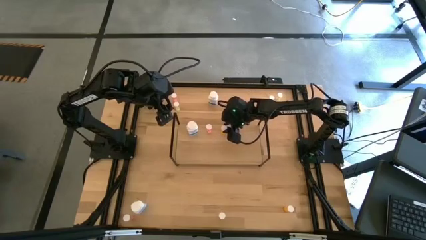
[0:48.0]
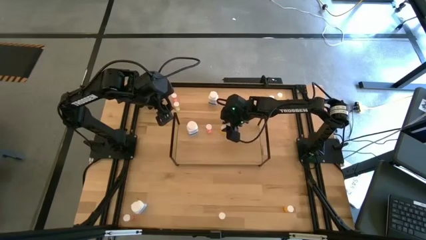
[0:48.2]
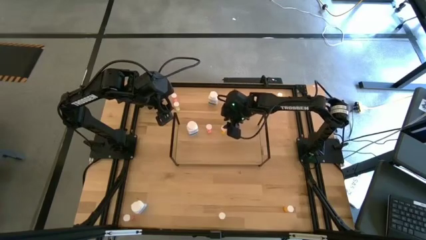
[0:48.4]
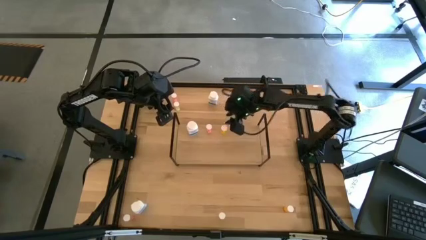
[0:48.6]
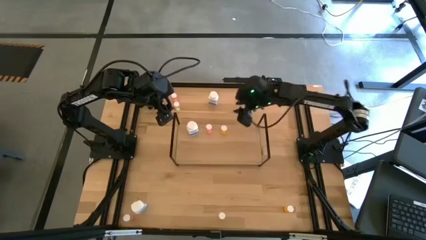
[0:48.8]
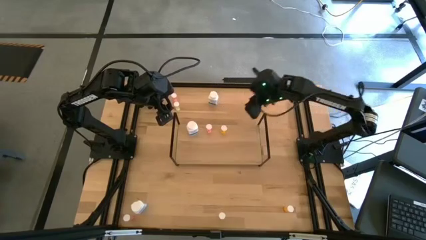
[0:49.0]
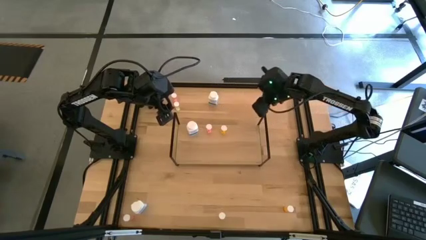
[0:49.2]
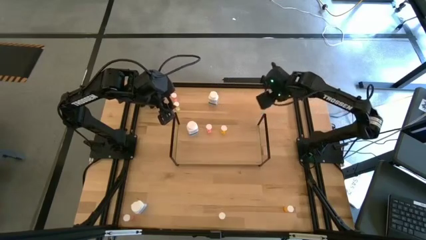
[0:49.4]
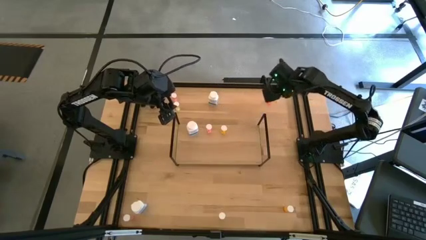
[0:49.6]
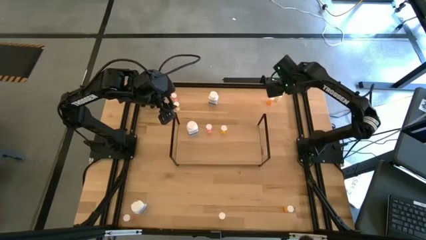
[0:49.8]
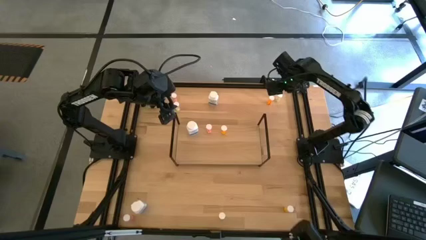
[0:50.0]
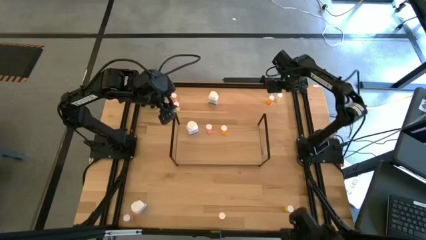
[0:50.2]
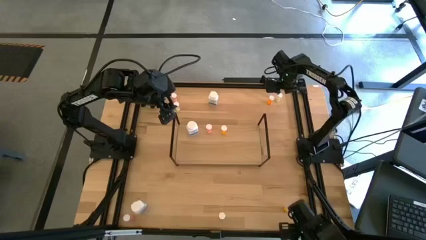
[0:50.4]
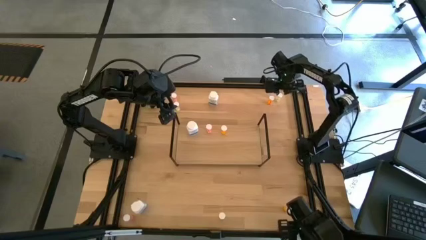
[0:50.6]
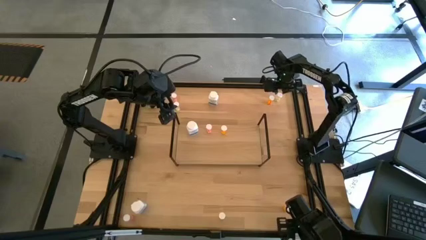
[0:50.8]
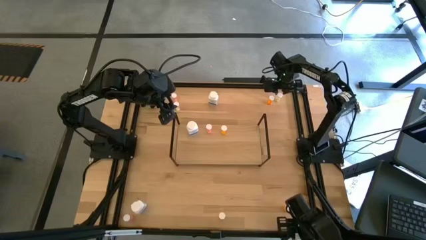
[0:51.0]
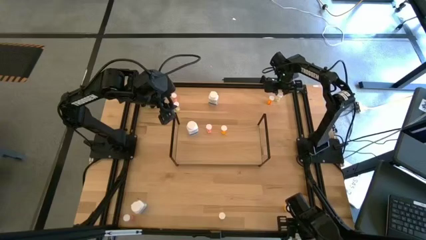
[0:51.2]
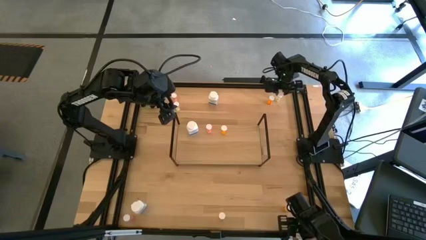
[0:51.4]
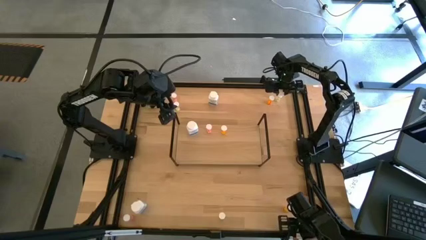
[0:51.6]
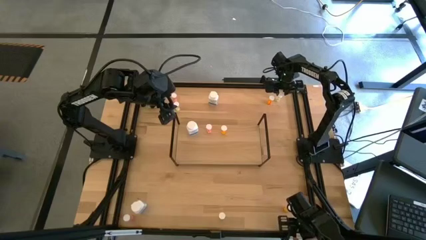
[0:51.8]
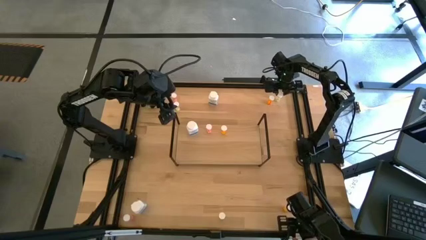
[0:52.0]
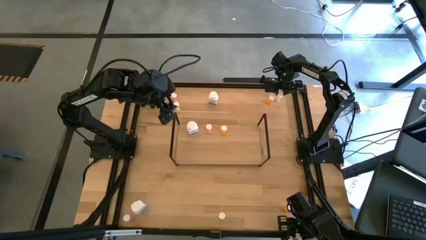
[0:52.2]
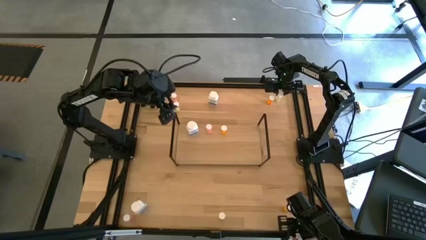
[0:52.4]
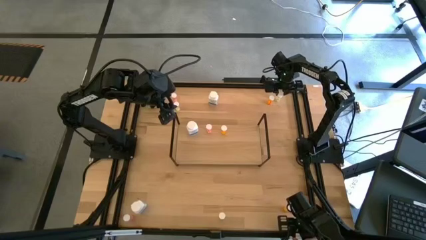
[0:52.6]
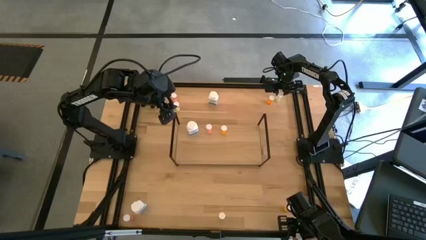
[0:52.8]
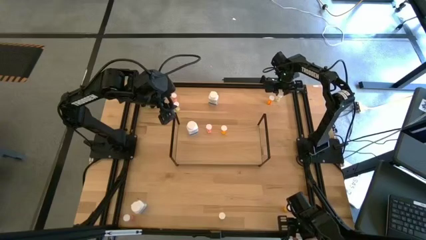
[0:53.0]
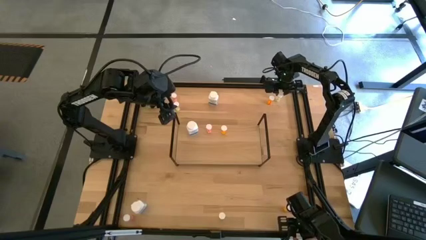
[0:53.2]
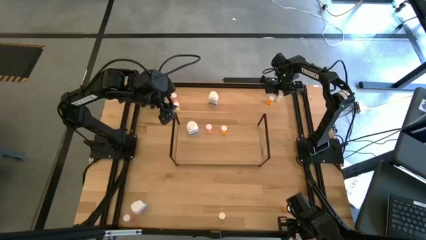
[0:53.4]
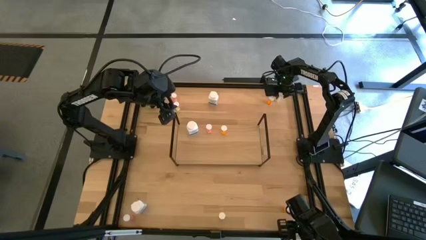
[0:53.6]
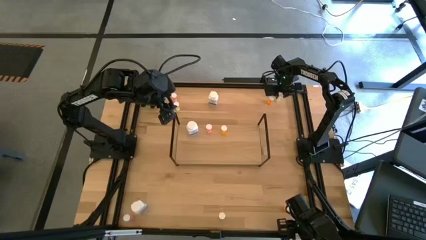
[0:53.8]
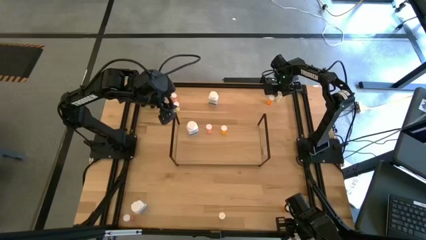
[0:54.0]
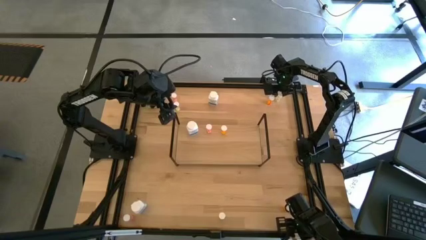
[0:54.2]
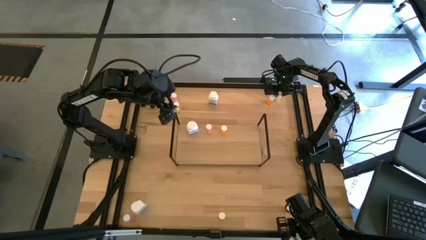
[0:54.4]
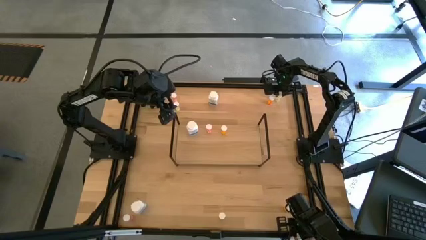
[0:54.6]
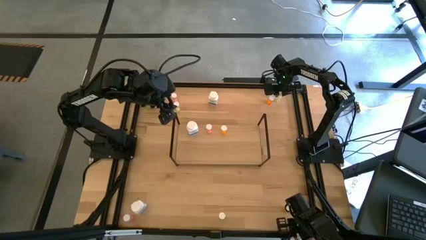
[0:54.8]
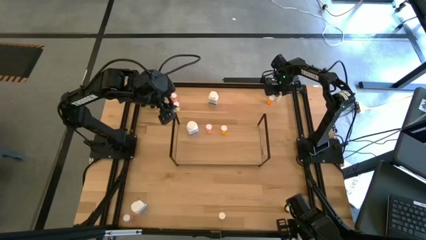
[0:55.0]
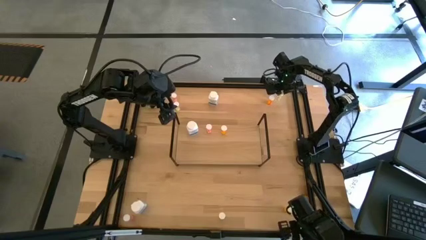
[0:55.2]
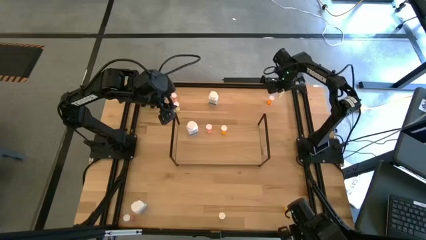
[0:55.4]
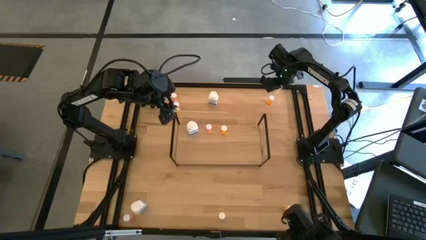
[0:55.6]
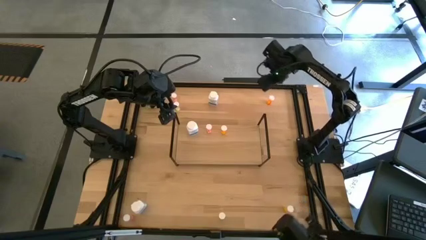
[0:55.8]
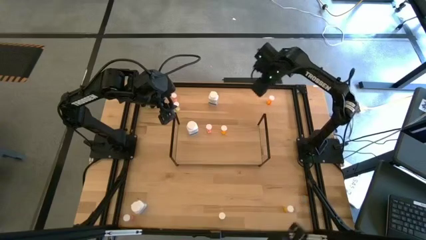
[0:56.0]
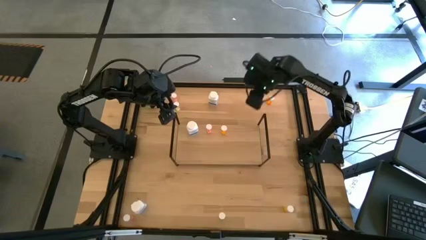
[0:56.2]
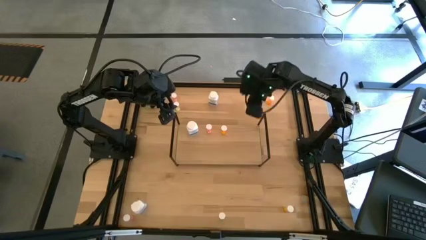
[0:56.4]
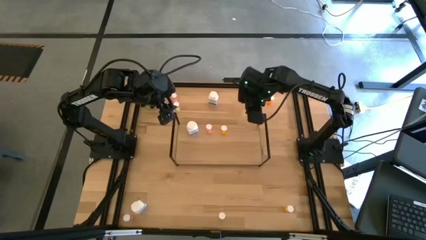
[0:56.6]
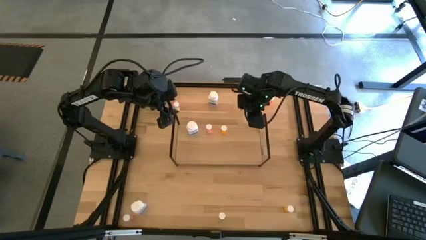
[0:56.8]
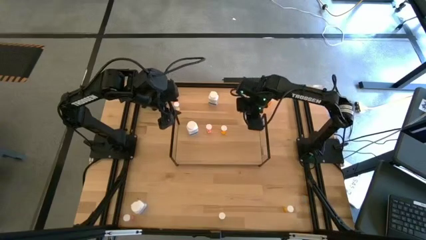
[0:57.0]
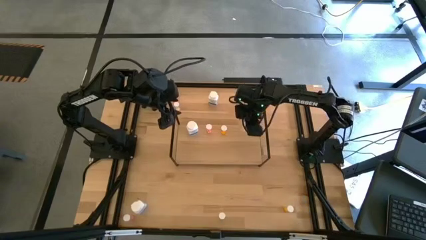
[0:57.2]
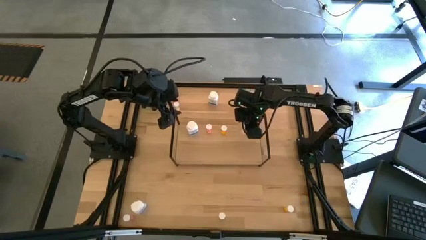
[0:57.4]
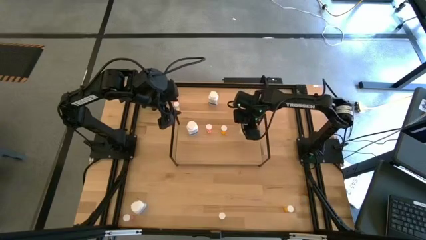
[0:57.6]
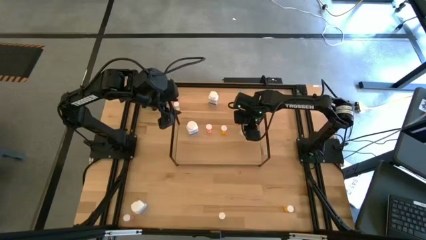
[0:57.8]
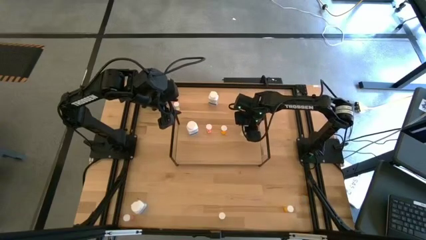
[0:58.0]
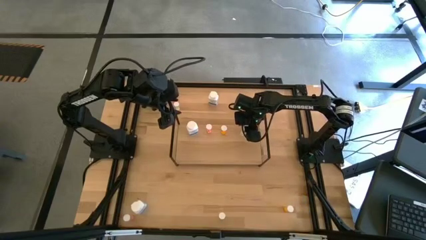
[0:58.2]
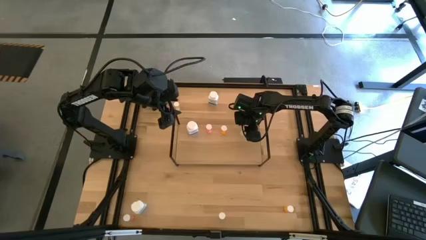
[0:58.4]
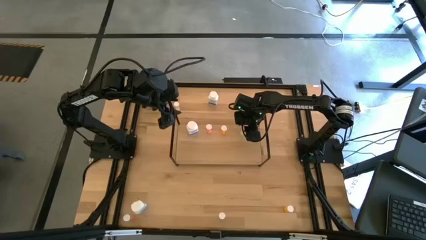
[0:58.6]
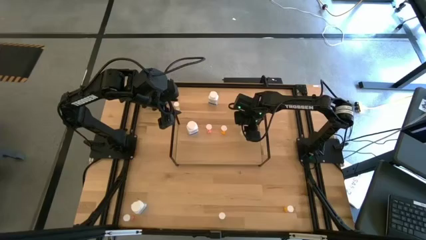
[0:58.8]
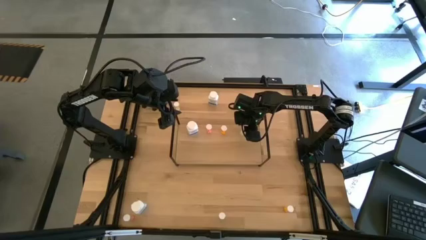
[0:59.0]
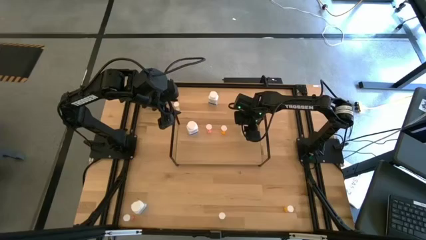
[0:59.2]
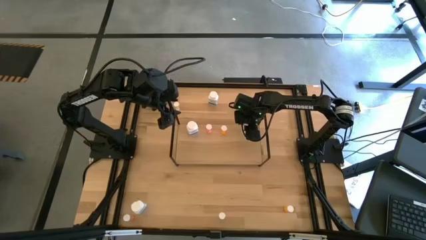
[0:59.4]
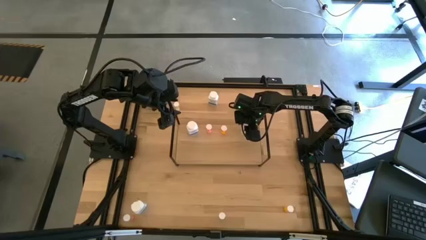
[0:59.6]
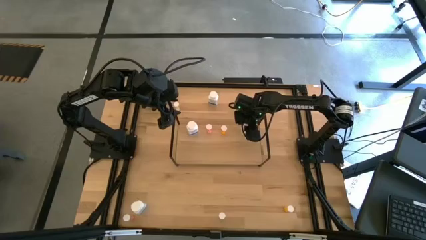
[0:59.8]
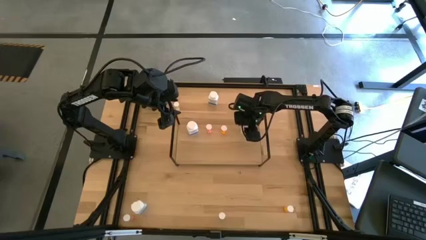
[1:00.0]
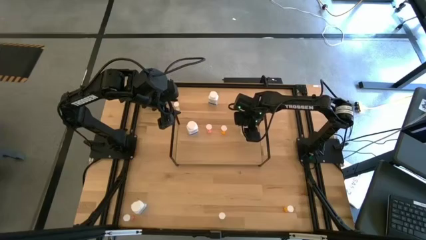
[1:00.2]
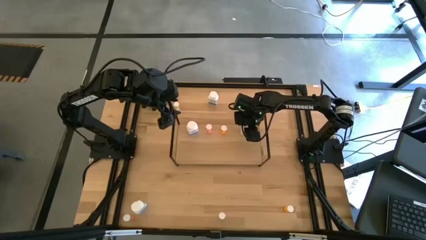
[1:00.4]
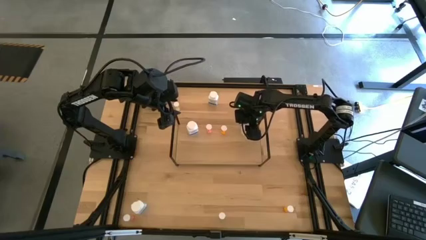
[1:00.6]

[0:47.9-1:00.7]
Task: Pick and place medicine bottles onto shelf by color
Put the top right yellow pill bottle on the shelf

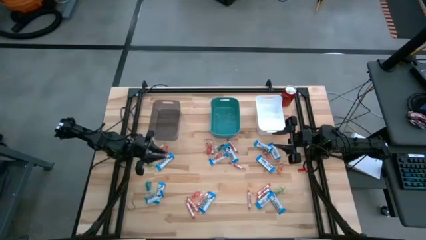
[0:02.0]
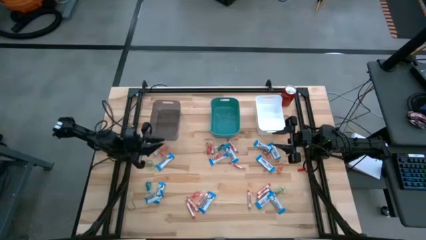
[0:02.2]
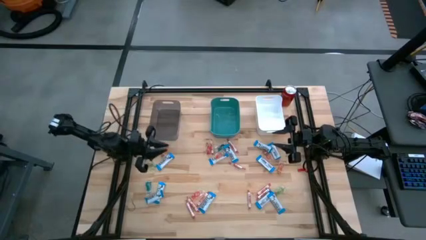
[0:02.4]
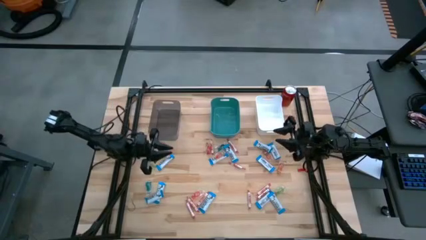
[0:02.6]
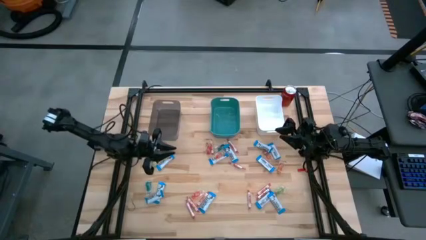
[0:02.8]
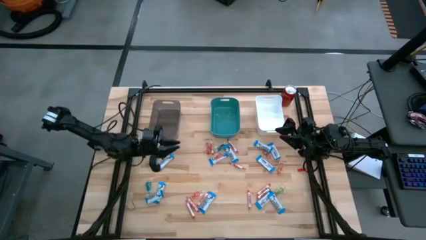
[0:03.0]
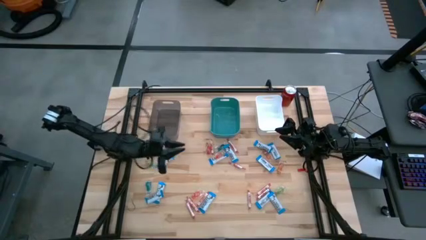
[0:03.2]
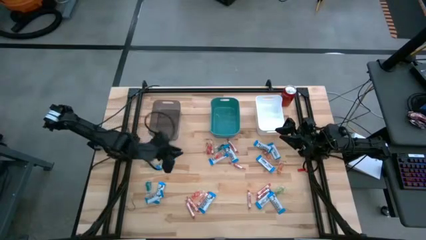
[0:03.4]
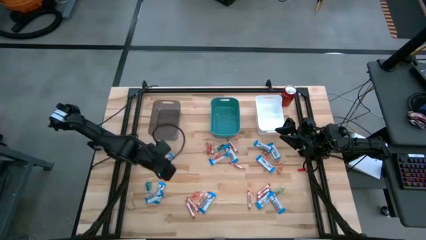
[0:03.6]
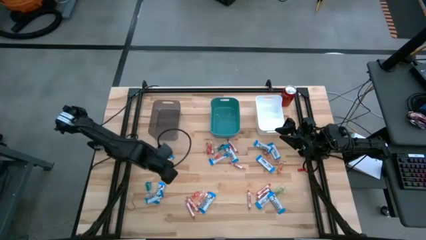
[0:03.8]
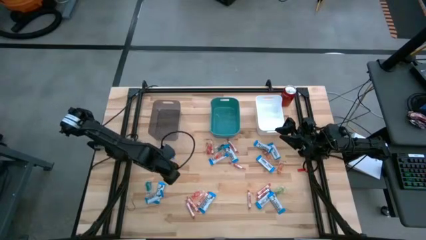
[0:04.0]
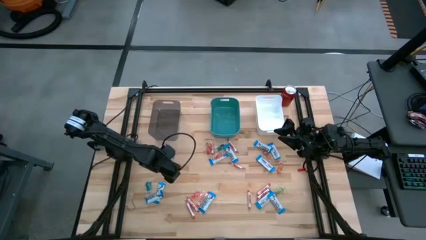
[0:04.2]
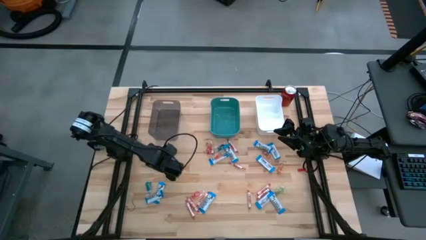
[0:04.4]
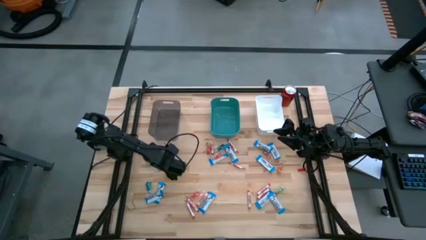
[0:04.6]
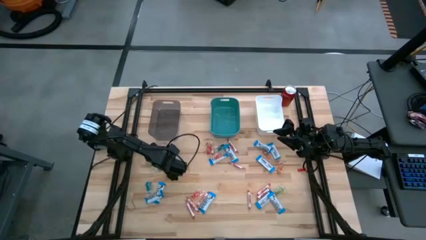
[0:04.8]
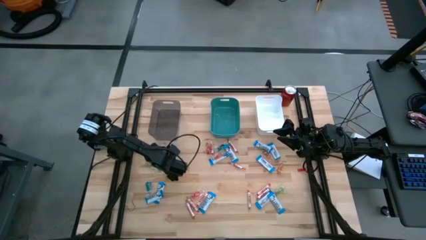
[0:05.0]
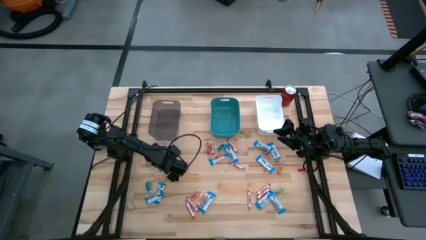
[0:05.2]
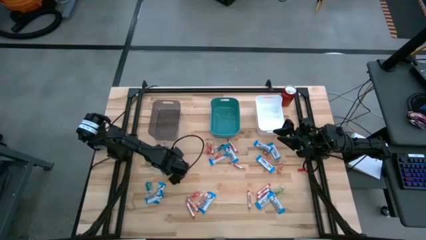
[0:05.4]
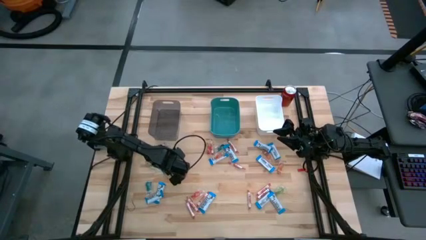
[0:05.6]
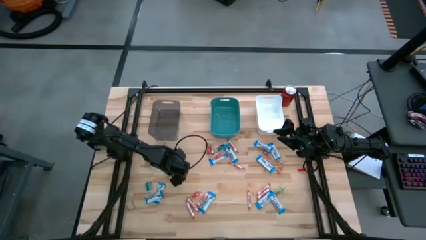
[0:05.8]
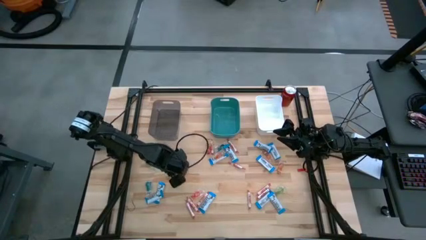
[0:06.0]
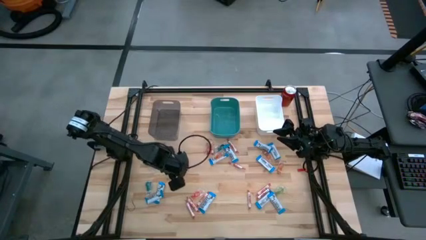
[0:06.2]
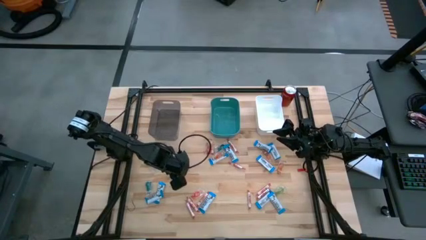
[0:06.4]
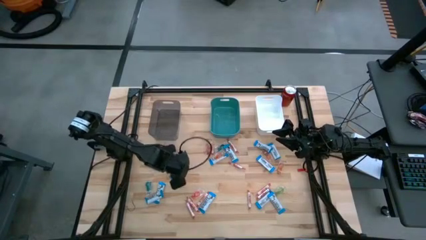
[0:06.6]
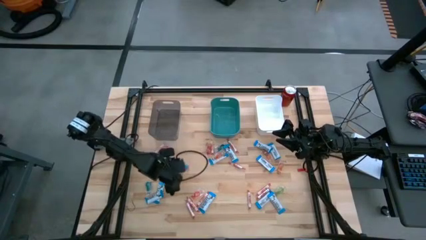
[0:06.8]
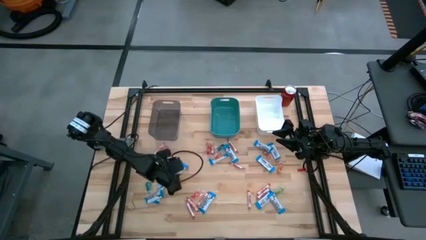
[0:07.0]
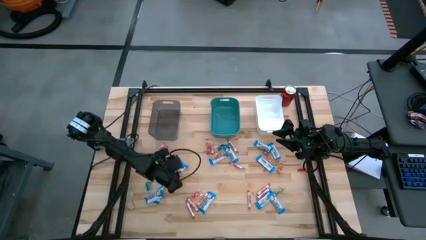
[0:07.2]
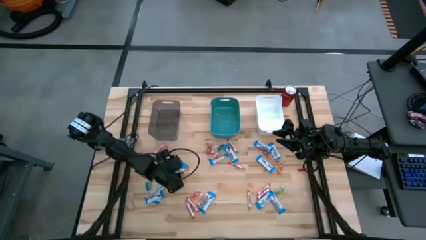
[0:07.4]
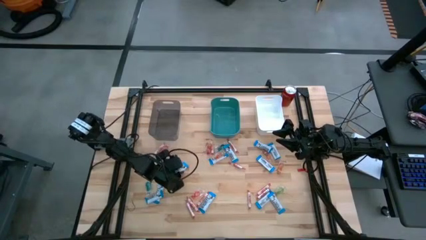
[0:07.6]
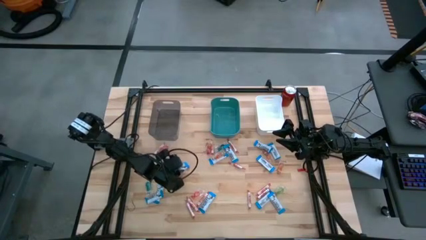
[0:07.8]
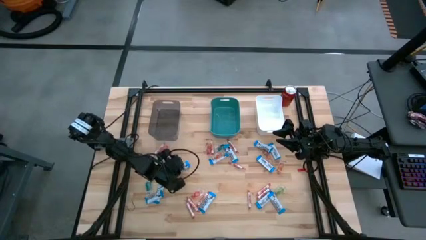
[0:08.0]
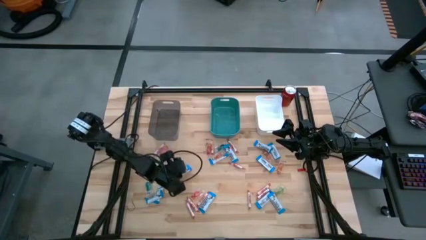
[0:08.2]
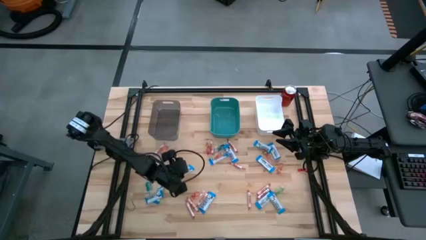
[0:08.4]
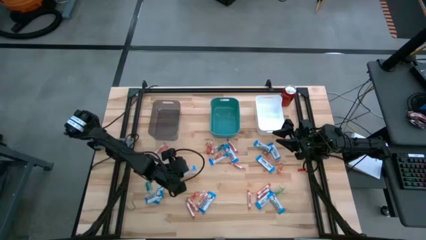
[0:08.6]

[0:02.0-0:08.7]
Task: Sort candy
Put the white chocolate into the black bin
